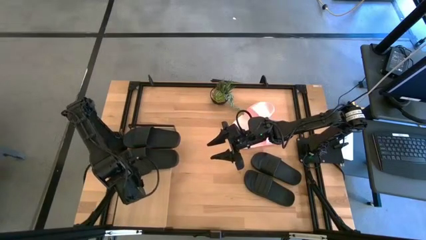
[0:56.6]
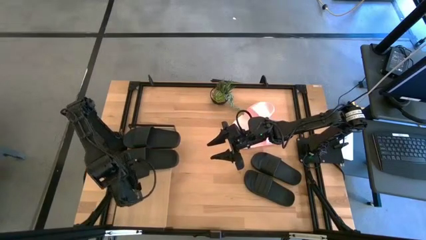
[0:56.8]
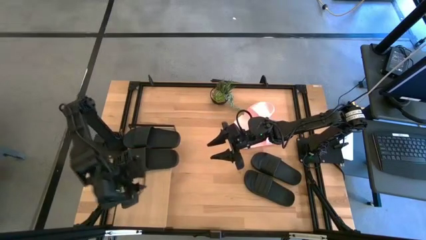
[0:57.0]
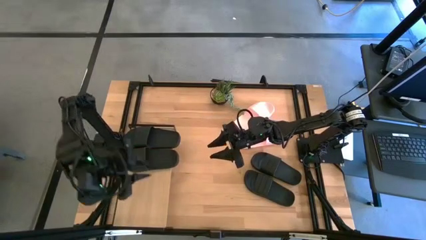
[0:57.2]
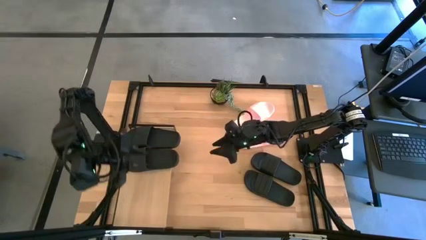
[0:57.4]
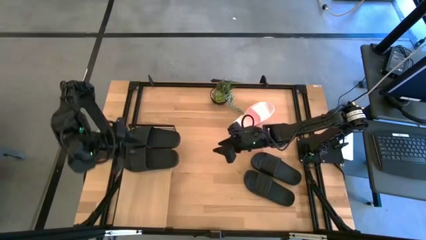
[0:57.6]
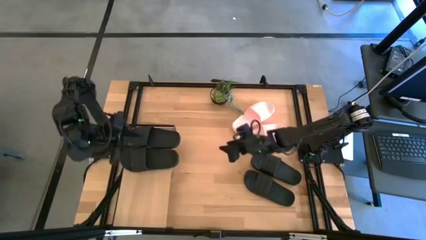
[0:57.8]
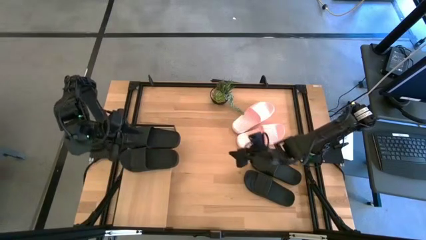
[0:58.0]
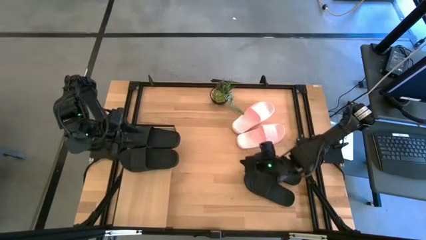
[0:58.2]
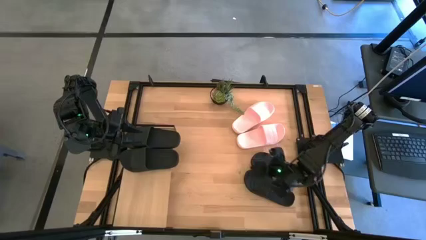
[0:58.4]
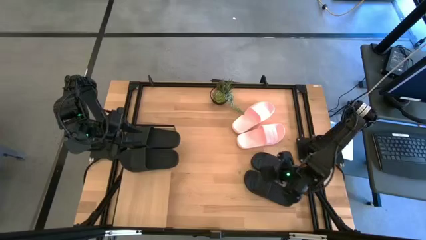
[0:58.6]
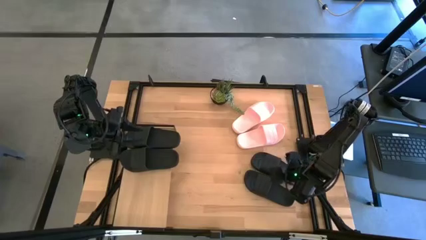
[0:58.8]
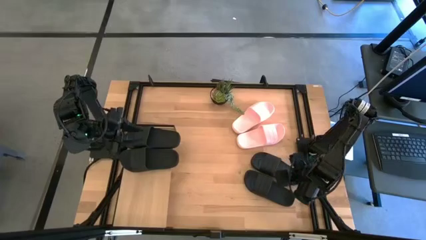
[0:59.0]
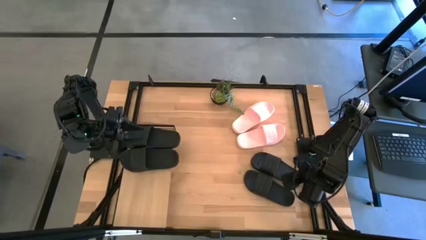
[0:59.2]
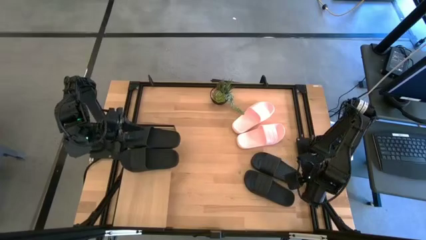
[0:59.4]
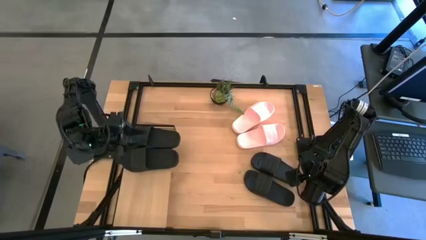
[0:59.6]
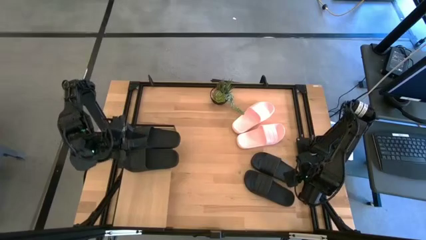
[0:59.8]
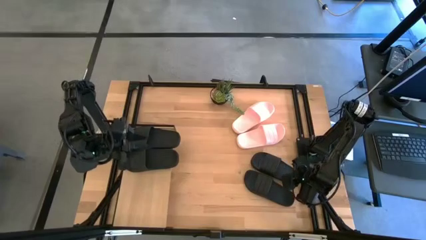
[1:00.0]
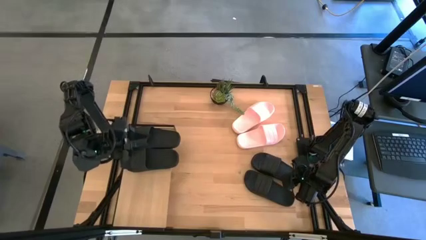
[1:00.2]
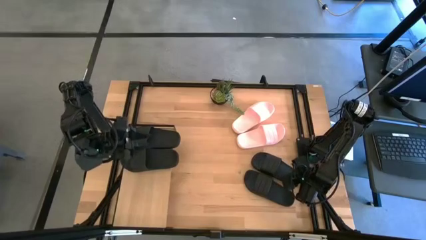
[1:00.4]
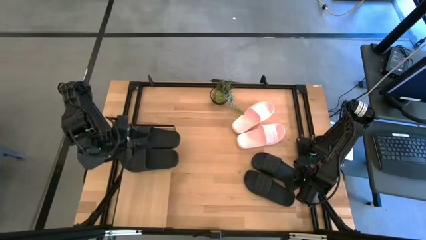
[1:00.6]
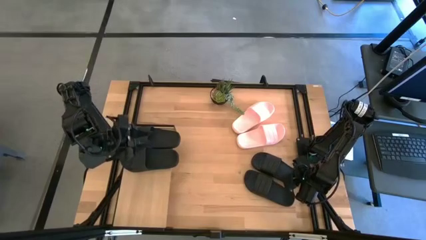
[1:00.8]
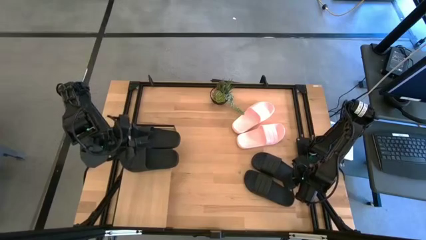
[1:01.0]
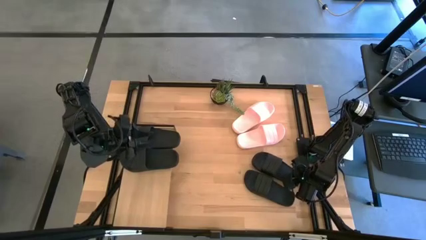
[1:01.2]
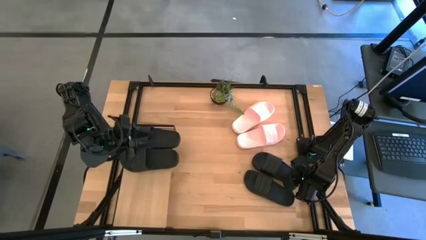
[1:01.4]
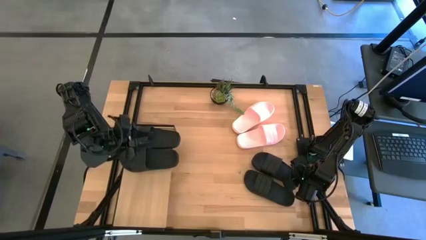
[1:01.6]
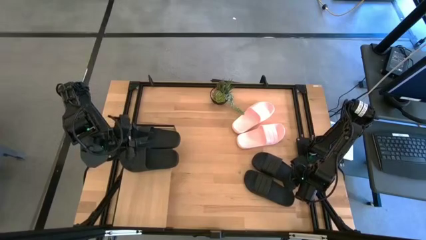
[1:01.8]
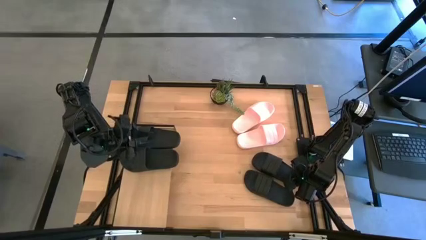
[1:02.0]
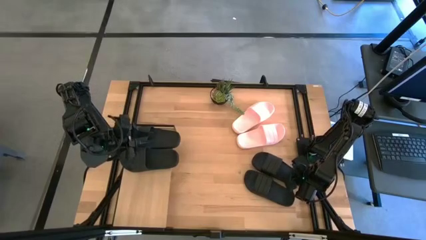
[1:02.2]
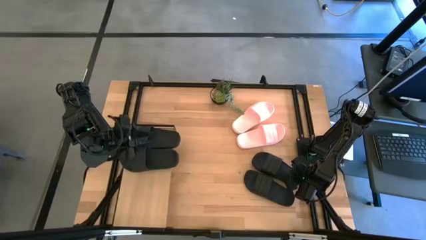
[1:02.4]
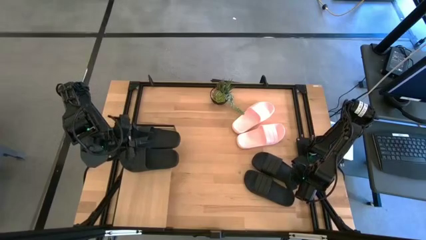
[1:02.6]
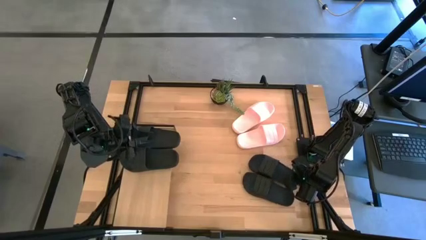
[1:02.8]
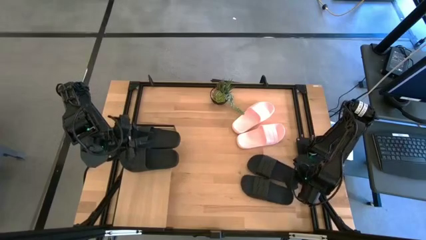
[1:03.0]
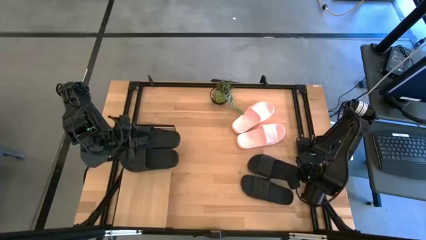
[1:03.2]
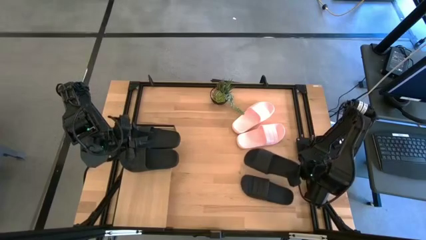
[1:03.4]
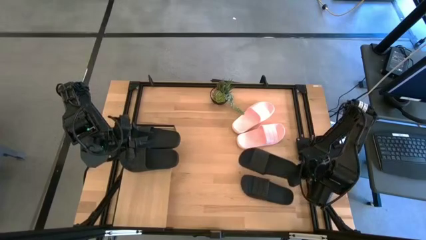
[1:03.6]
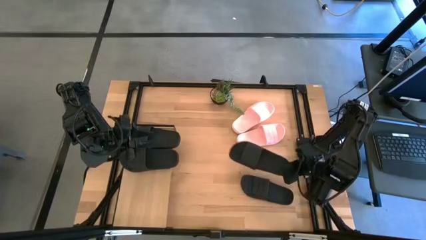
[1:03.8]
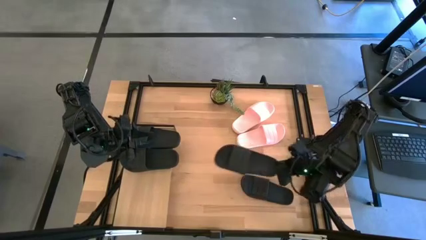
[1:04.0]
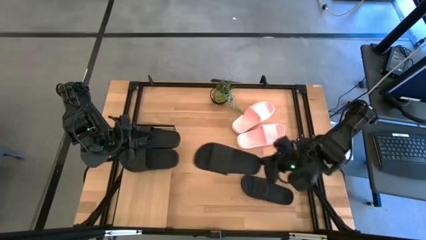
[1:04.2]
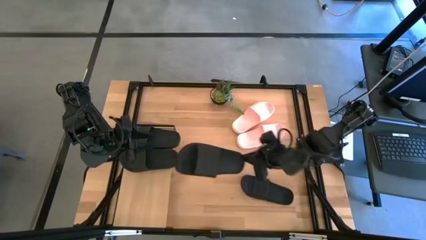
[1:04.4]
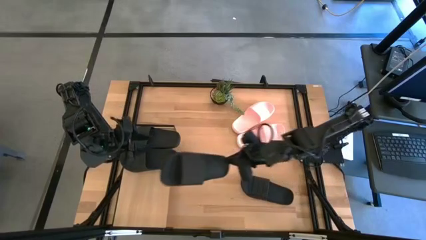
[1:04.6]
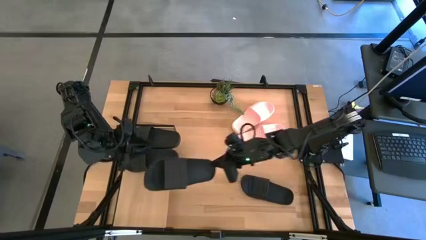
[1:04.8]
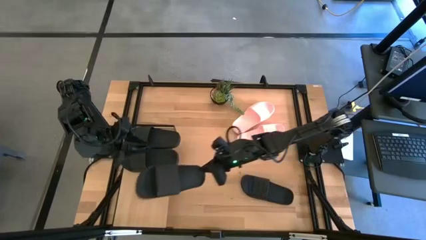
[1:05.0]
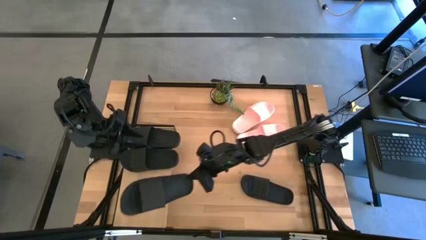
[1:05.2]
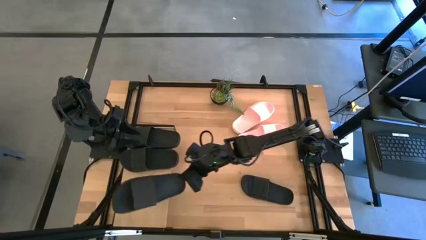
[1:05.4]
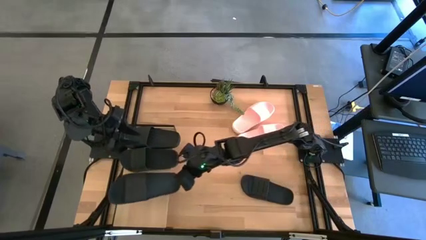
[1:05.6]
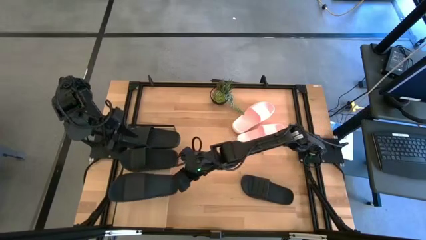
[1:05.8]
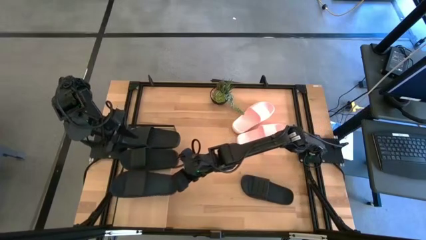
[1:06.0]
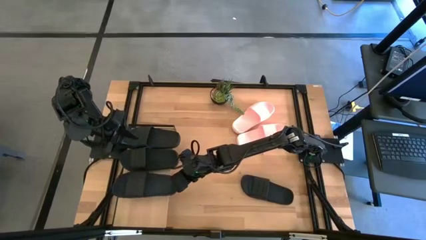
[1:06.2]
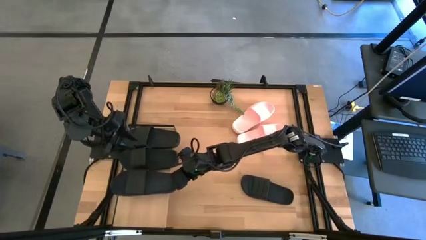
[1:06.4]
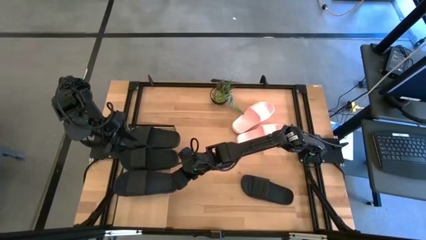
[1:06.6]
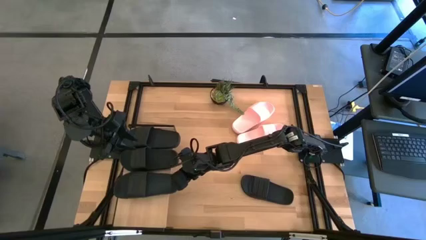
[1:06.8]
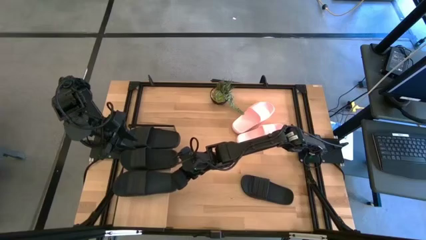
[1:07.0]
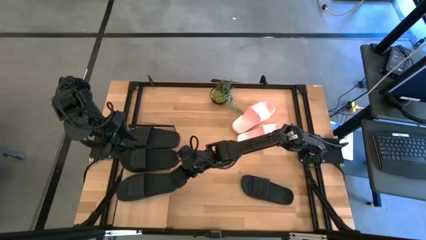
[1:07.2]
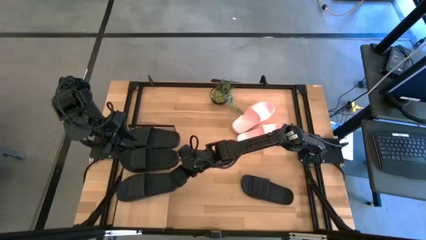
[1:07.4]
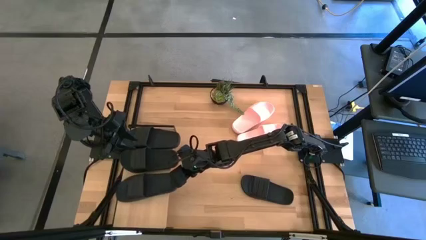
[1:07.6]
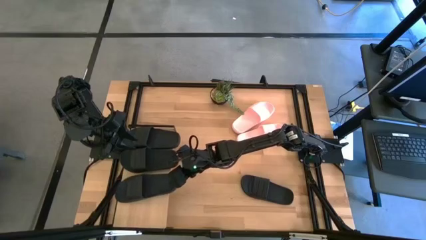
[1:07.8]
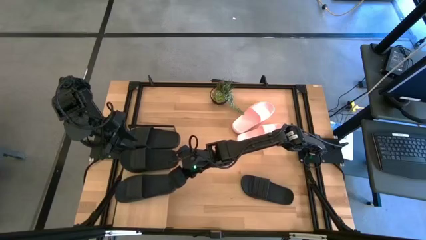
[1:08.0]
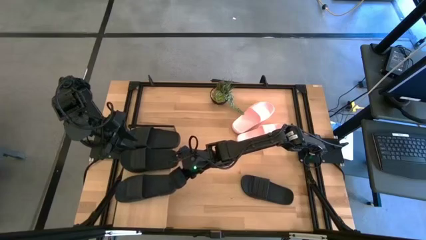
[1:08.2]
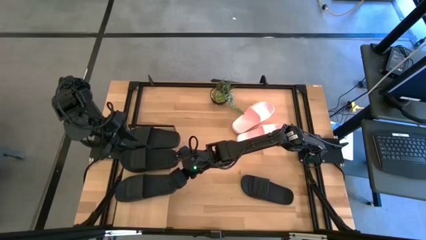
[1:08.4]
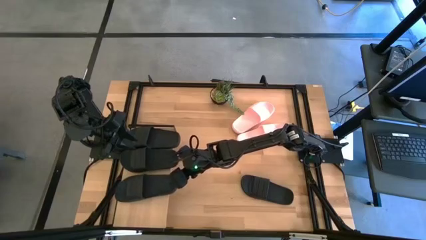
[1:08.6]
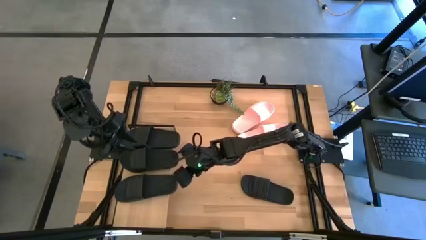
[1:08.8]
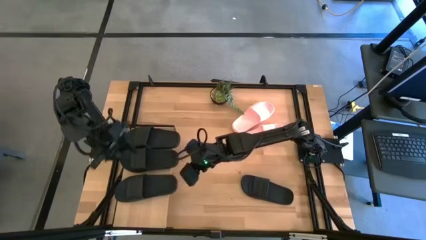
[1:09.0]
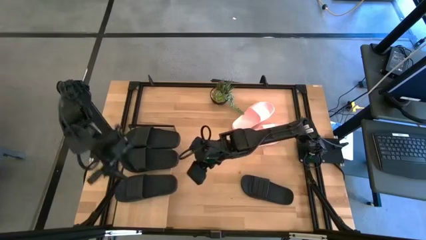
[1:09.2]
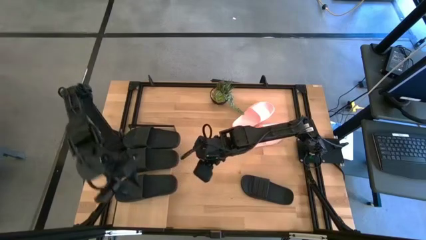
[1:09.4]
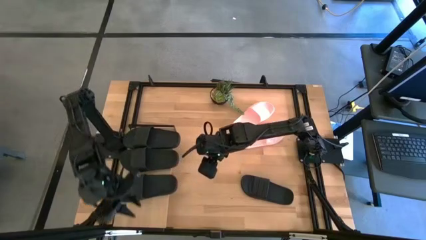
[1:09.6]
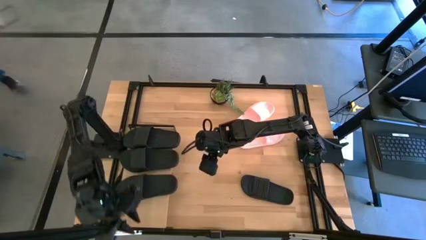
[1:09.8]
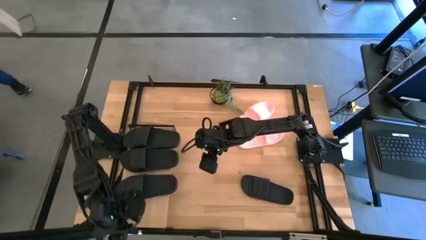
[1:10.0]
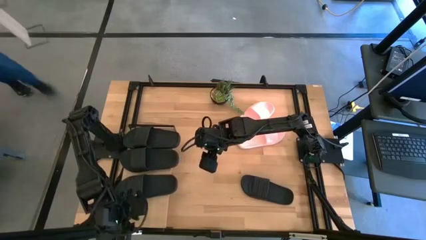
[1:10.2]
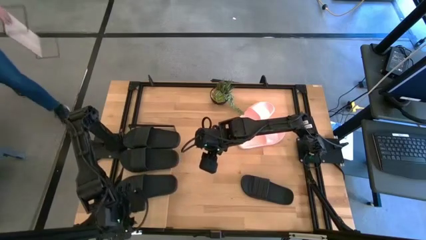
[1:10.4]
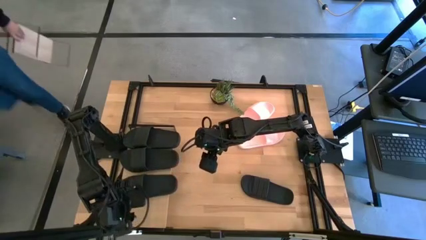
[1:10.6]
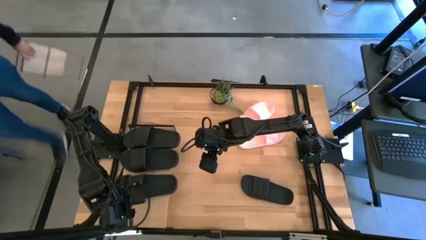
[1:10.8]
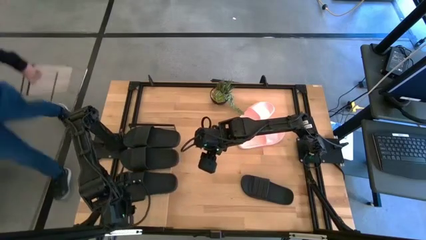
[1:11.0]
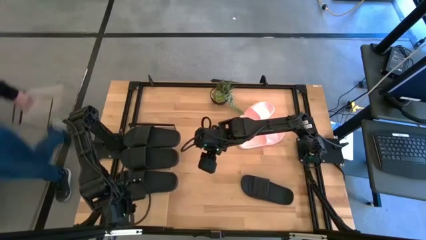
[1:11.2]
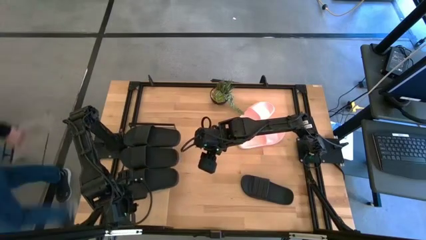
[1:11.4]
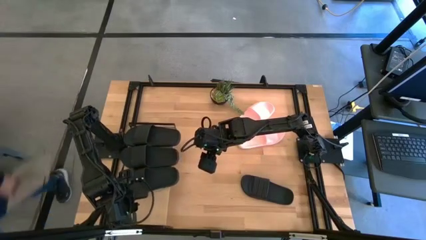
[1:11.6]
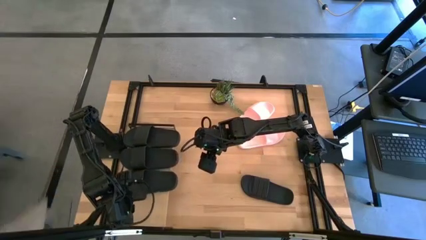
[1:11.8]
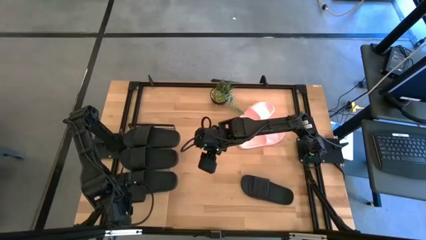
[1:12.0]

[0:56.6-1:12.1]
Task: Pick and place slides into the shelf
Put the black slipper on the shelf
